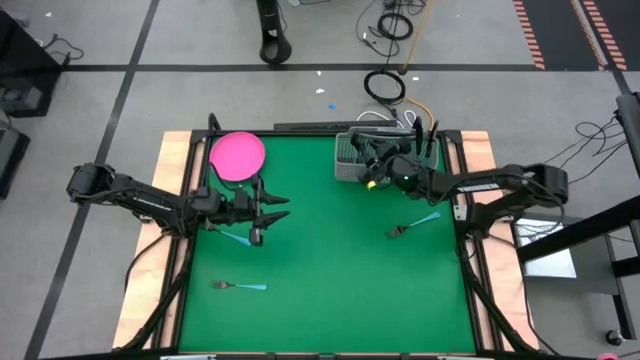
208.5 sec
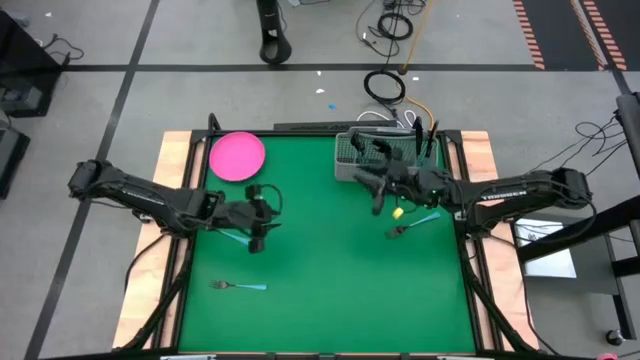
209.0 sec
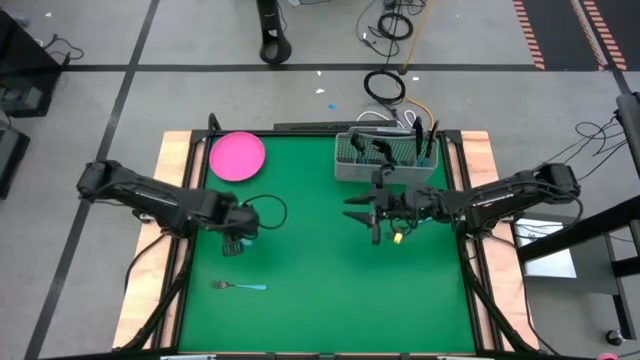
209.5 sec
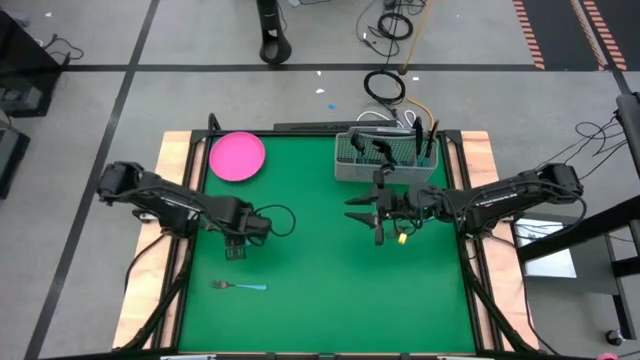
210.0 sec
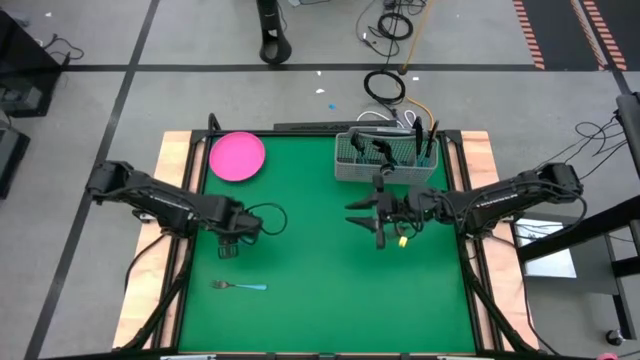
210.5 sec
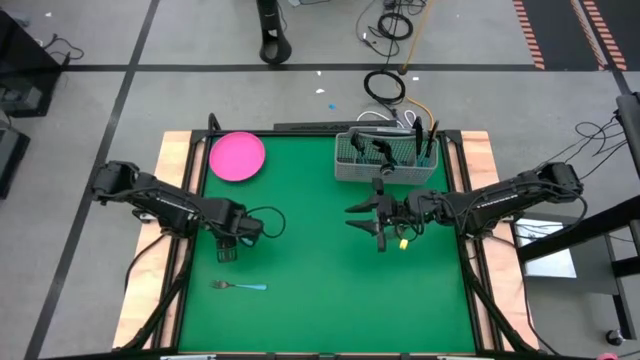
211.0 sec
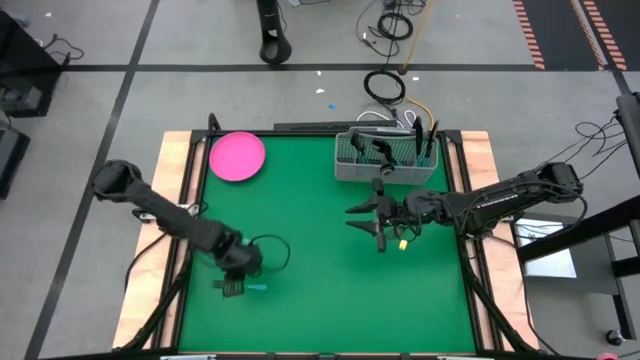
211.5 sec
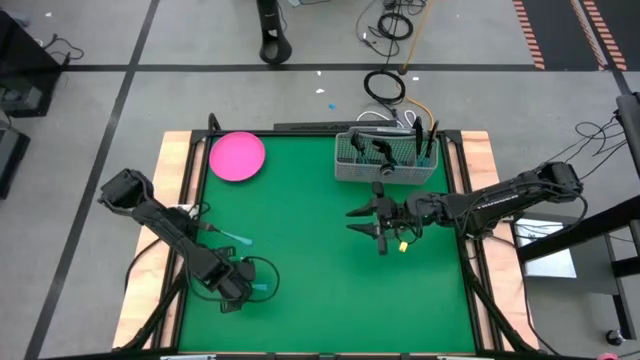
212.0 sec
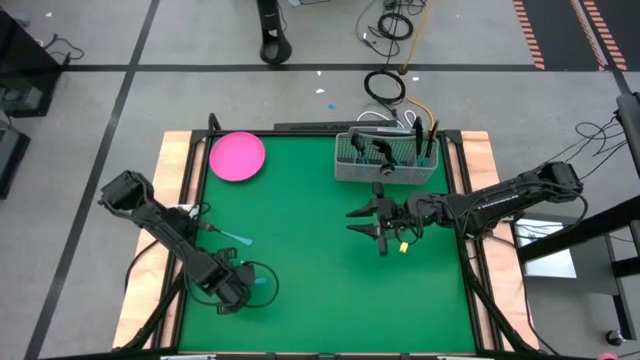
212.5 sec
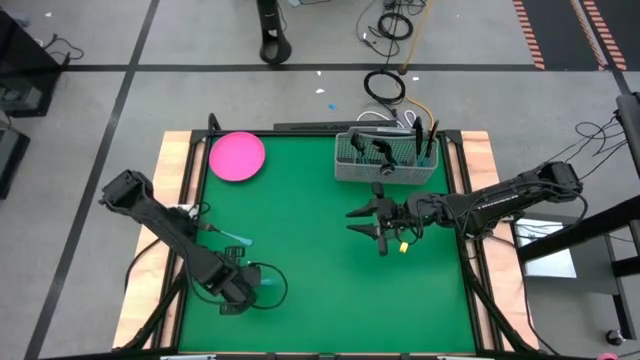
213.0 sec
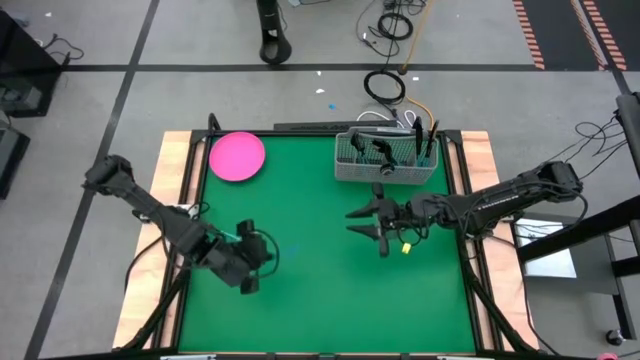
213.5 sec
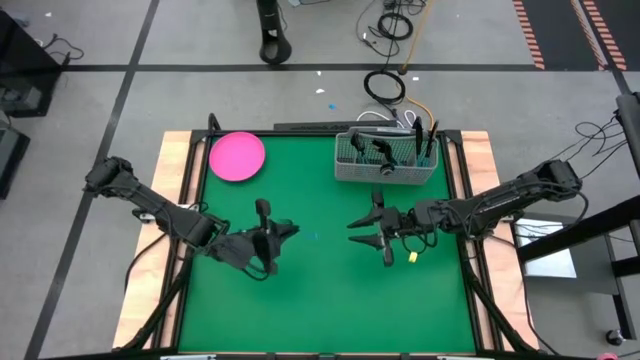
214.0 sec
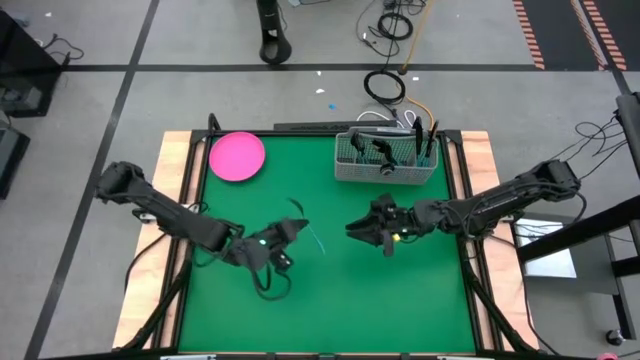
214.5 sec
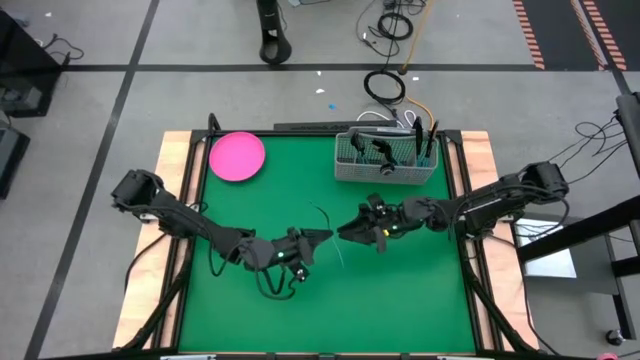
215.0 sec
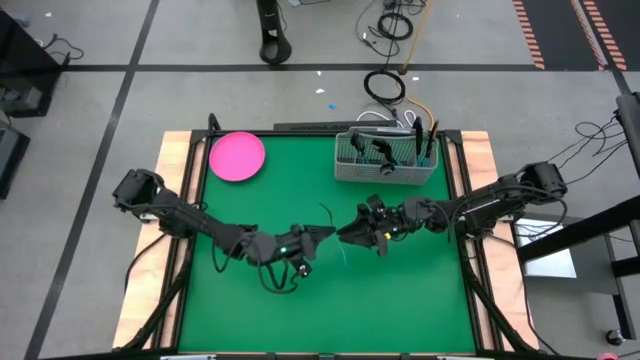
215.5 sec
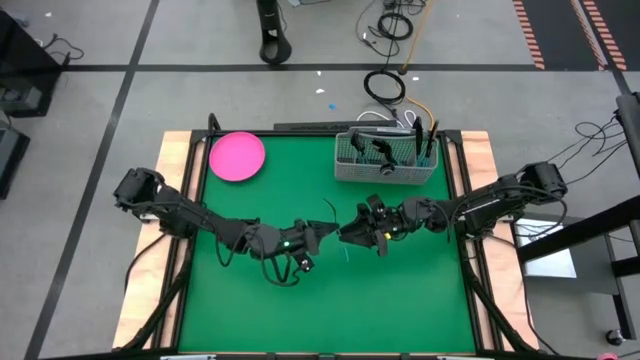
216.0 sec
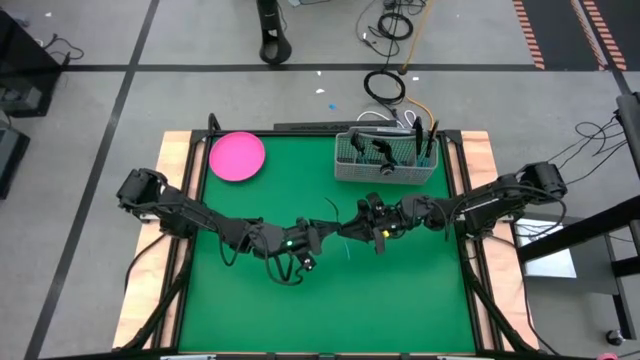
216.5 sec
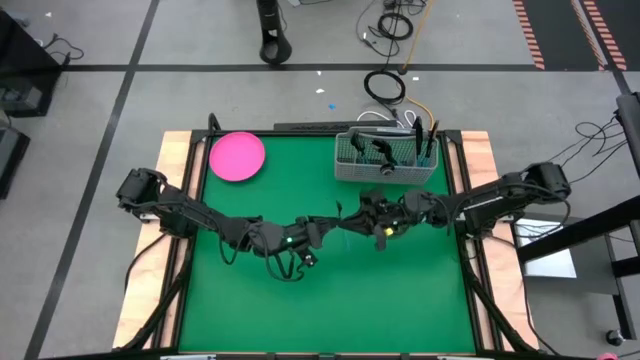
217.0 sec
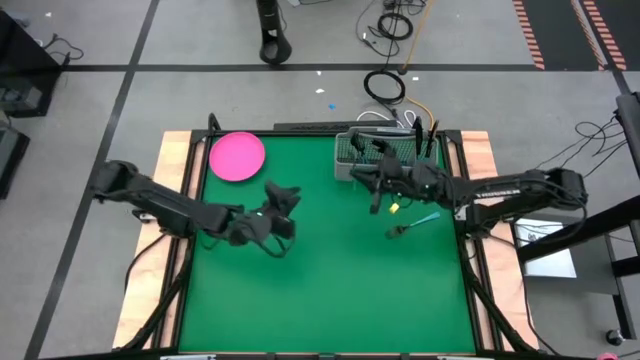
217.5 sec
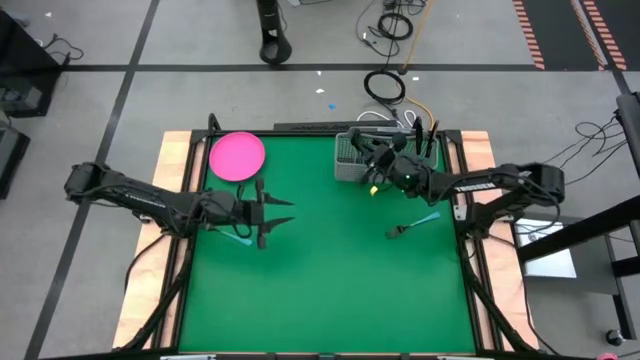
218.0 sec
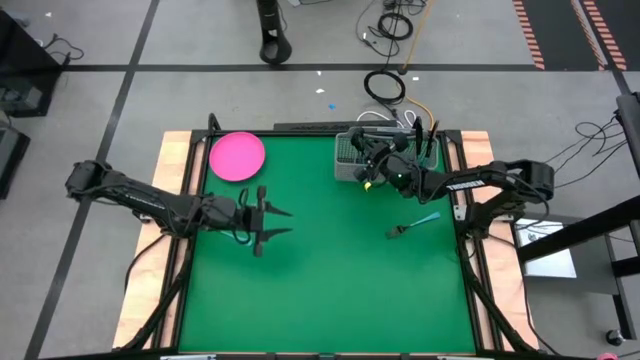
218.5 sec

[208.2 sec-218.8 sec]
Task: Sort silverware
Put the bottom black fork into the cutlery rack with the other black forks

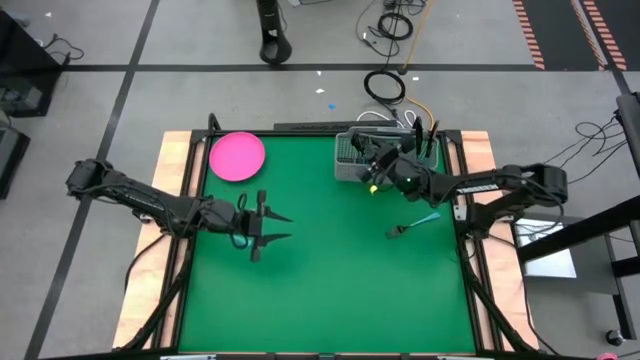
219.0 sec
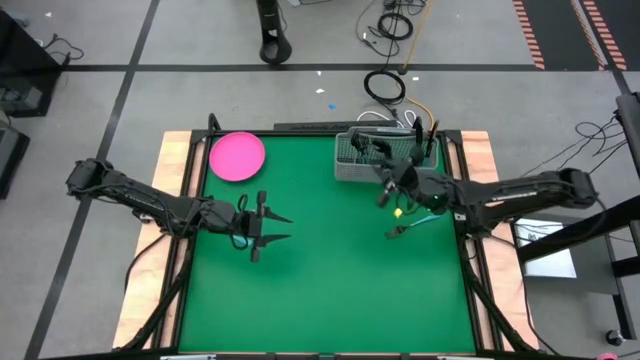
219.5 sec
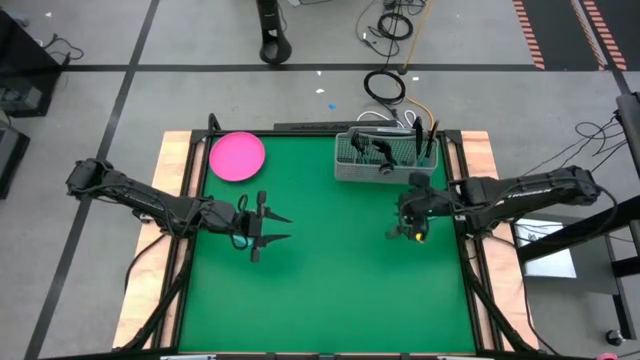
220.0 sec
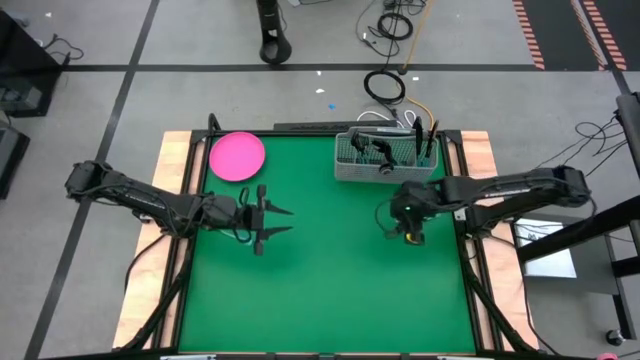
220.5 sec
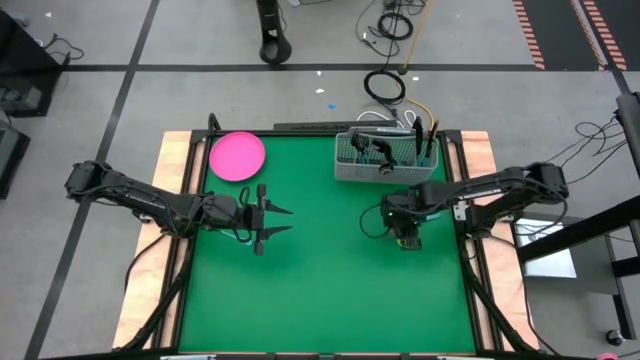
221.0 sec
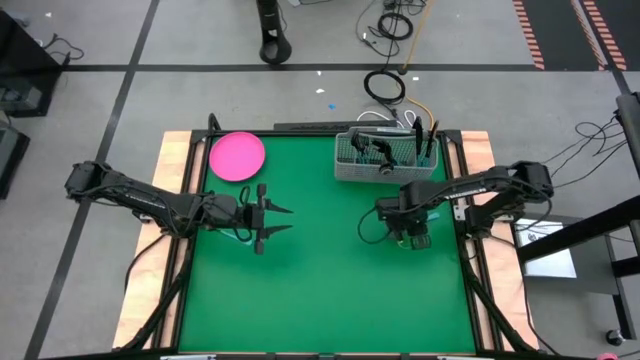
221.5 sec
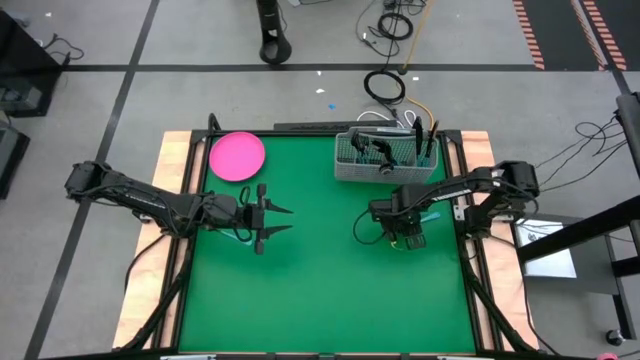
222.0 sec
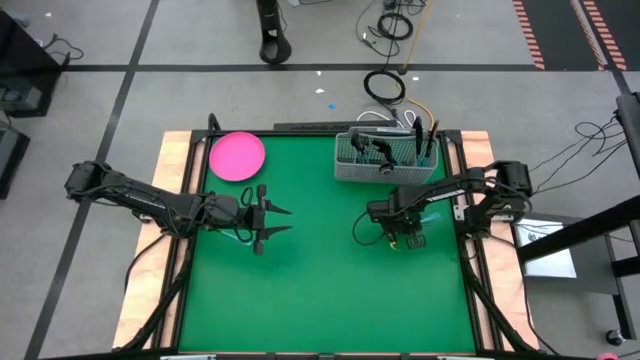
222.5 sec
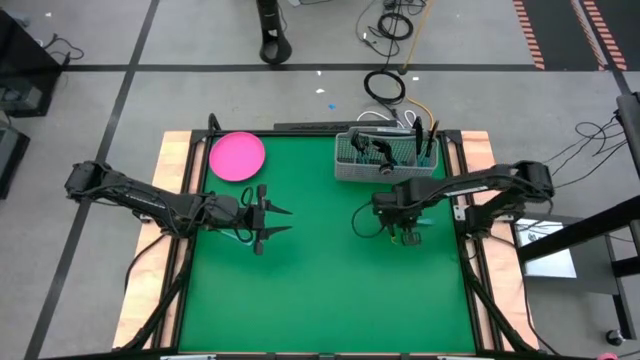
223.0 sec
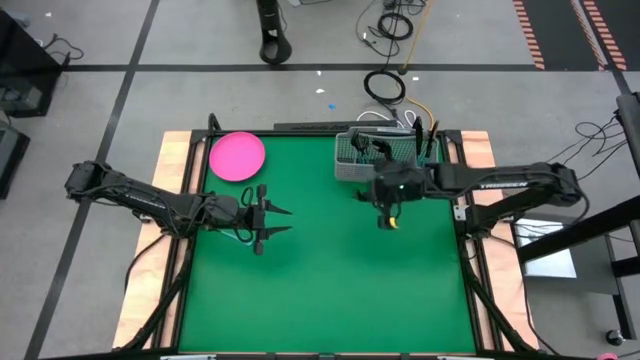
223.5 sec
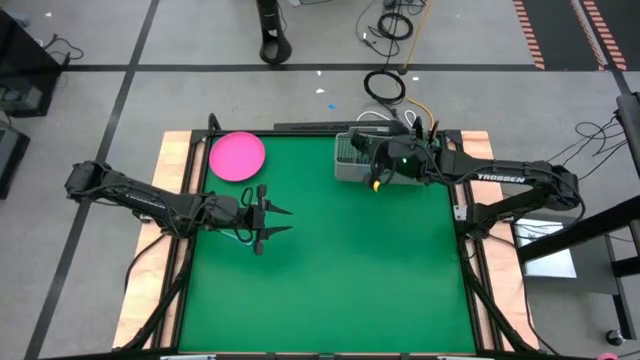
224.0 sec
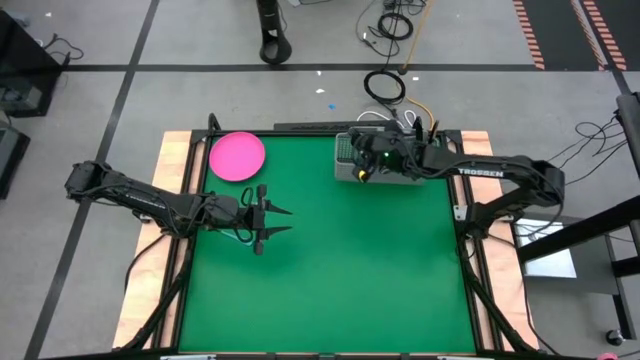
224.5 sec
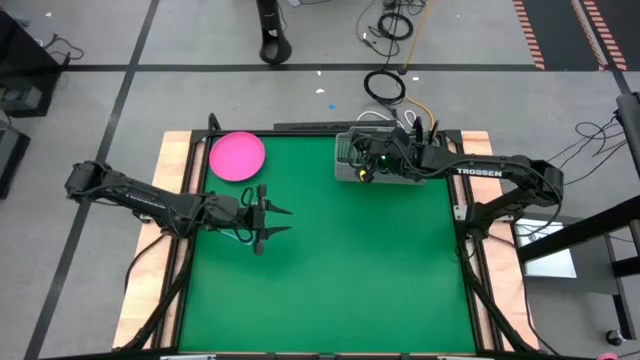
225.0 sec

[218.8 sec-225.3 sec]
Put the right black fork into the cutlery rack with the other black forks

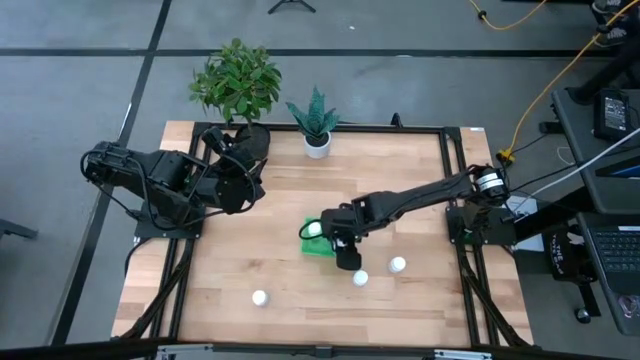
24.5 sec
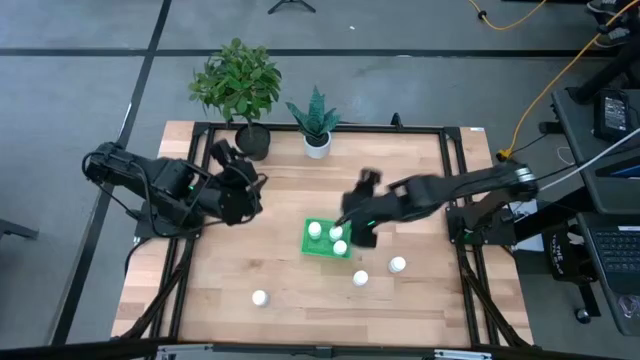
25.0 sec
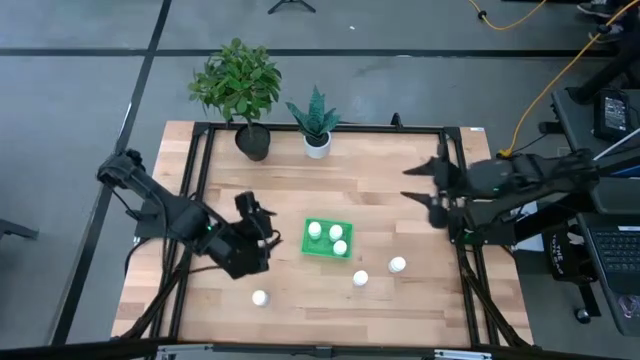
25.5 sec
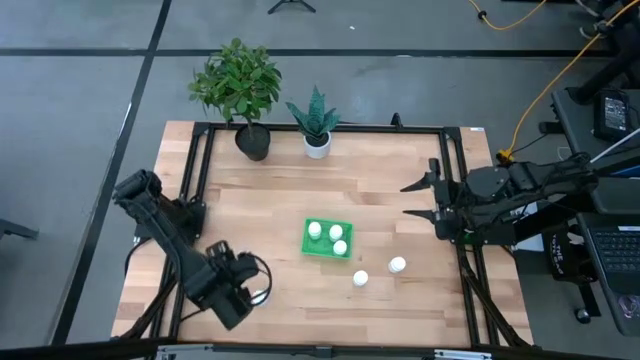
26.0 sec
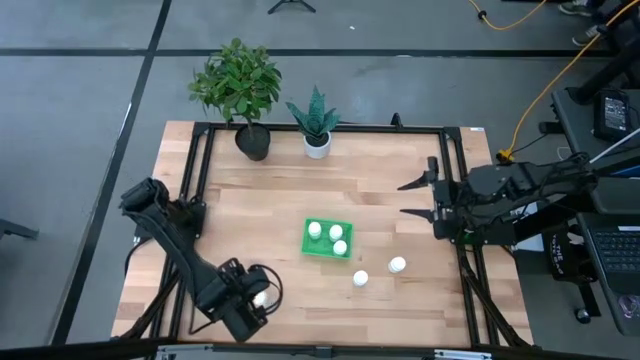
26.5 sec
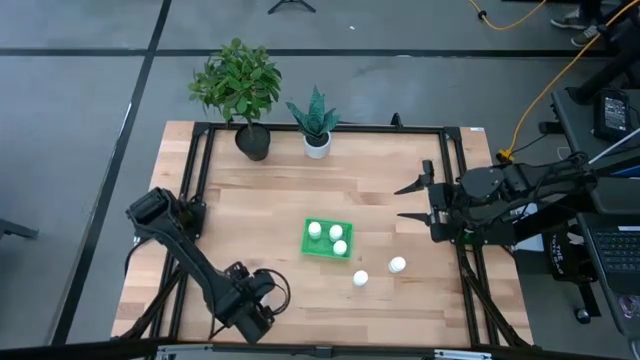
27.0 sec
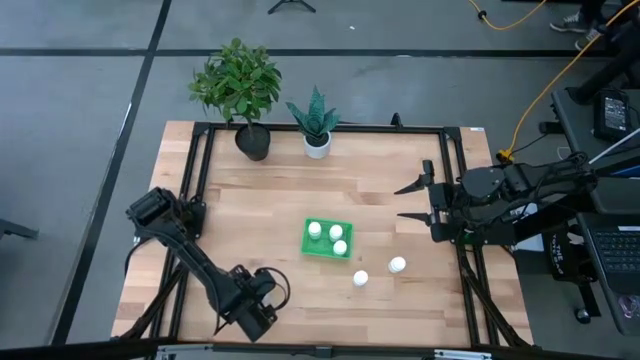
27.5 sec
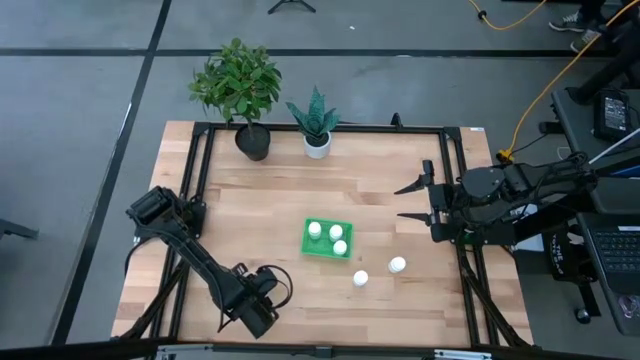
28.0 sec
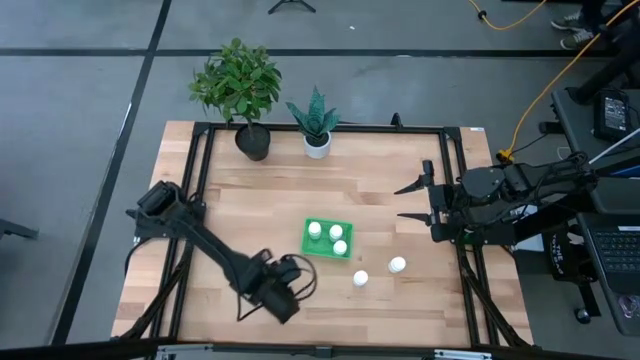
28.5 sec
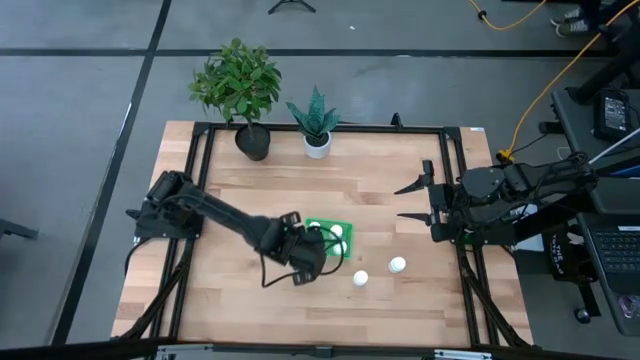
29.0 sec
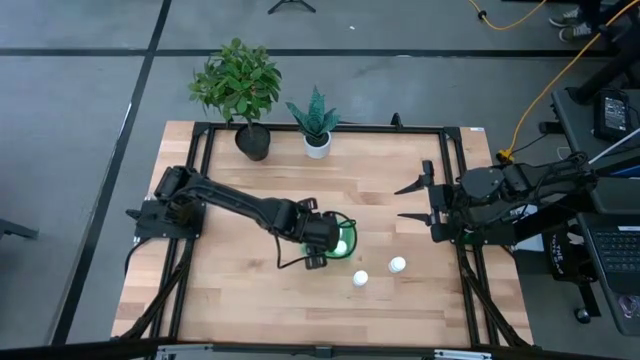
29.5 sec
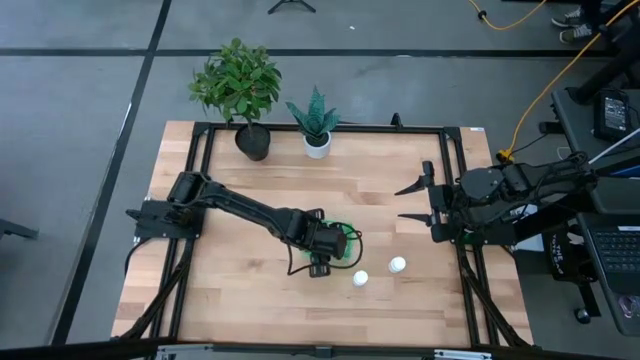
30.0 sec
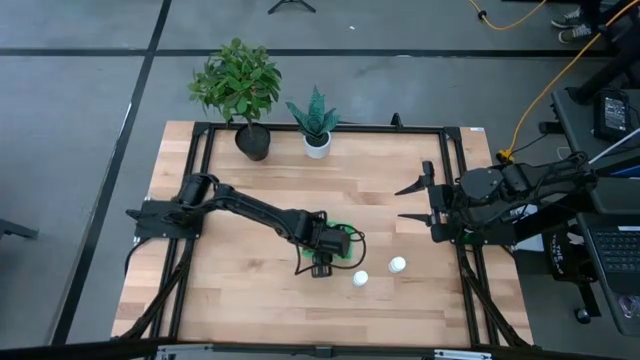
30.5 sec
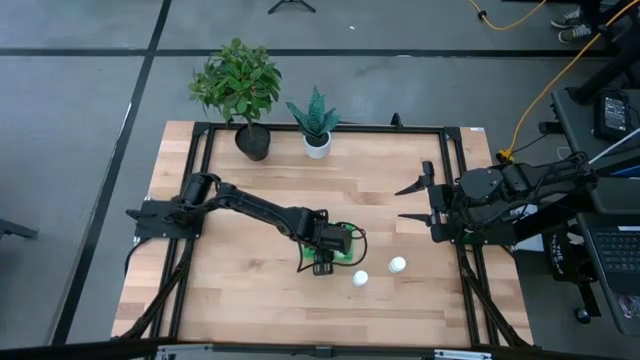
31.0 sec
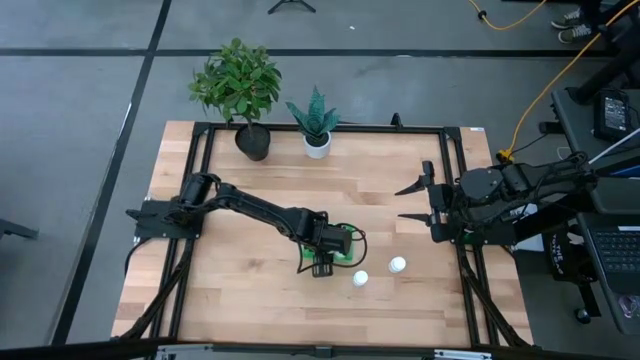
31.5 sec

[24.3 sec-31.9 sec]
Task: Pick and place pill bottles into a basket
Put the white pill bottle into the green bin
